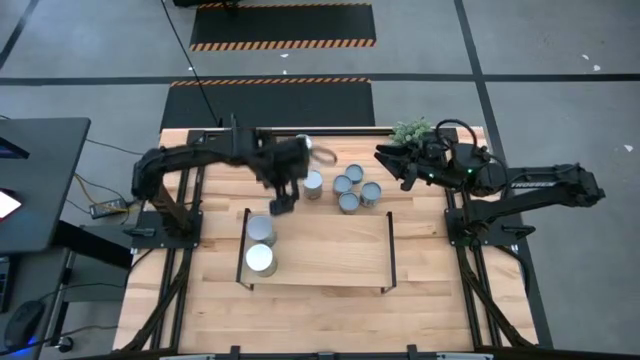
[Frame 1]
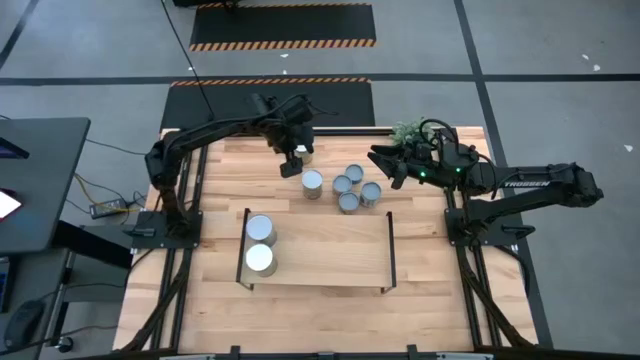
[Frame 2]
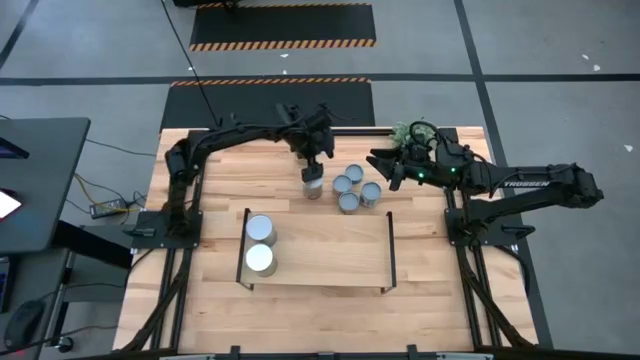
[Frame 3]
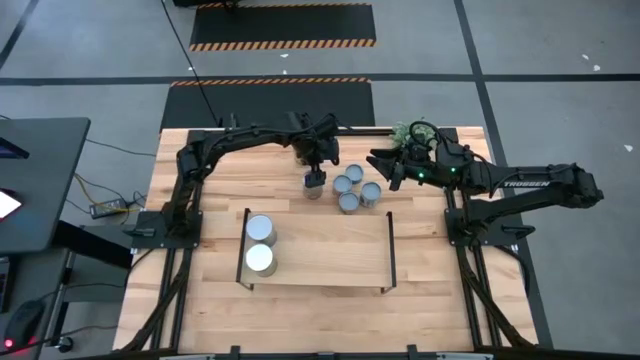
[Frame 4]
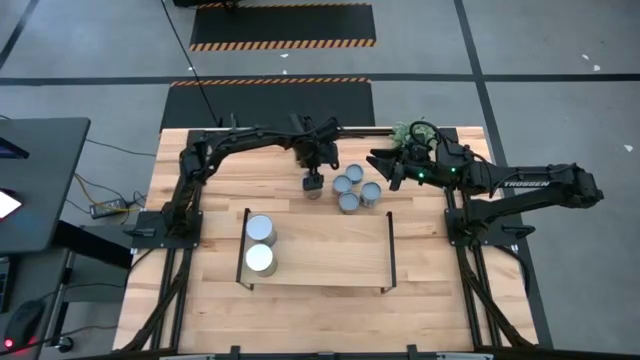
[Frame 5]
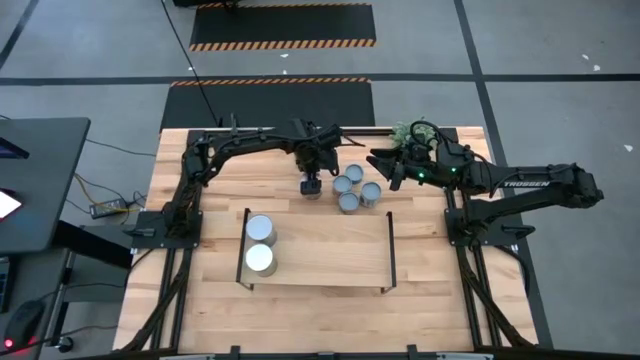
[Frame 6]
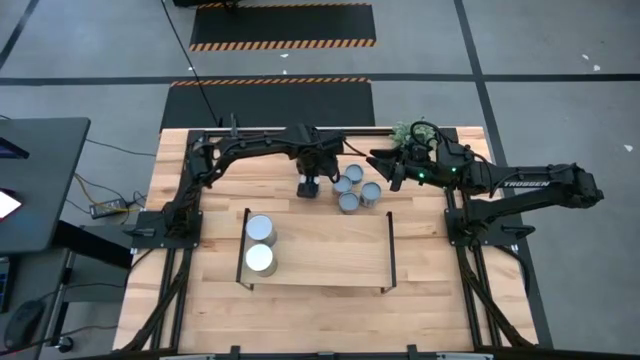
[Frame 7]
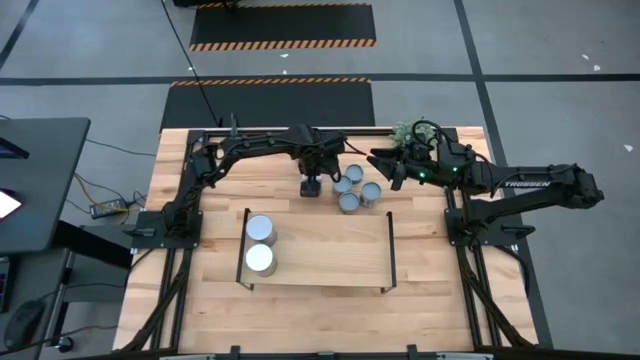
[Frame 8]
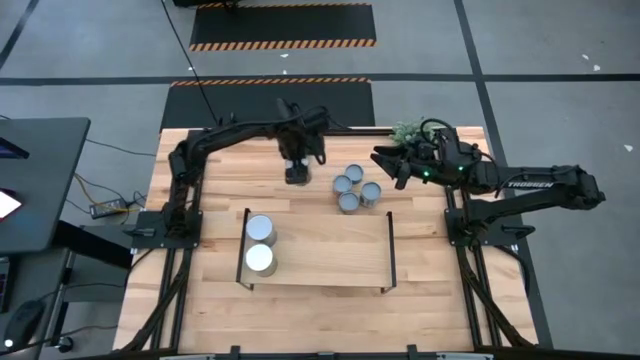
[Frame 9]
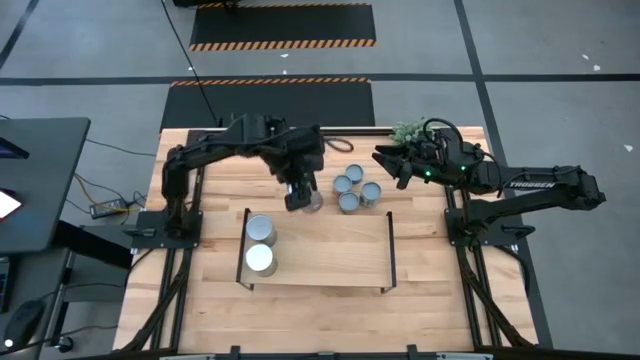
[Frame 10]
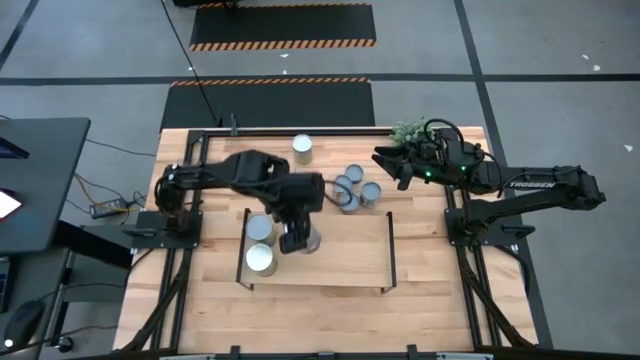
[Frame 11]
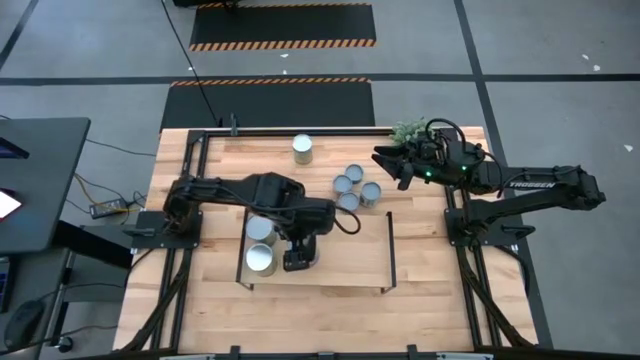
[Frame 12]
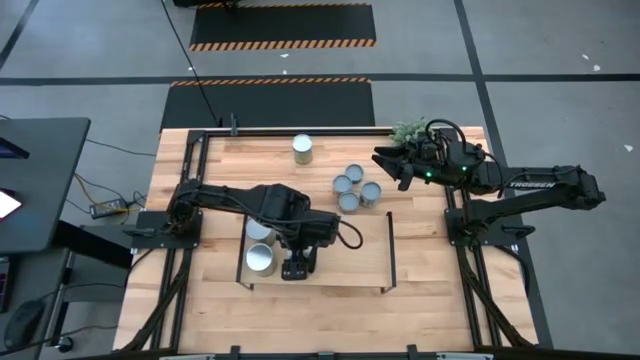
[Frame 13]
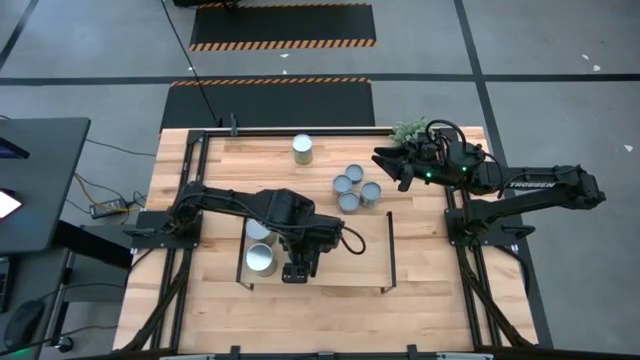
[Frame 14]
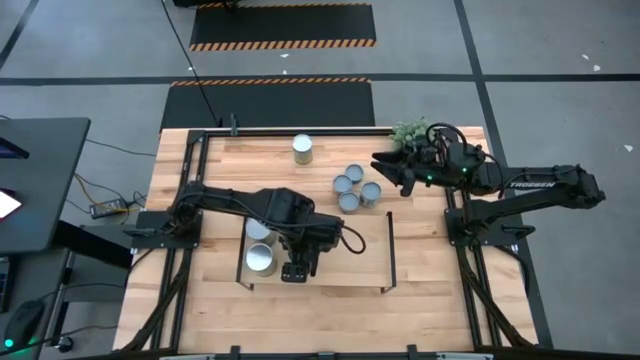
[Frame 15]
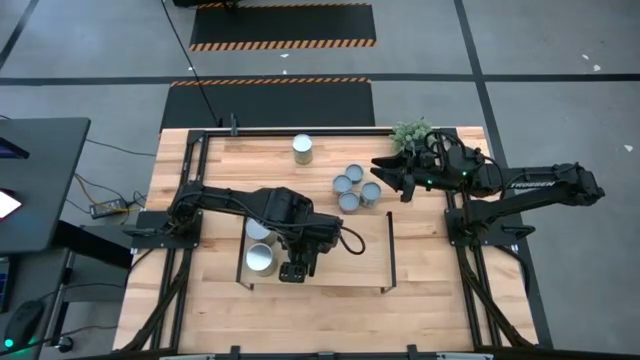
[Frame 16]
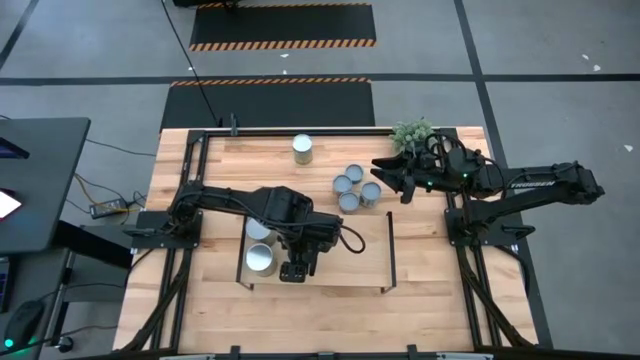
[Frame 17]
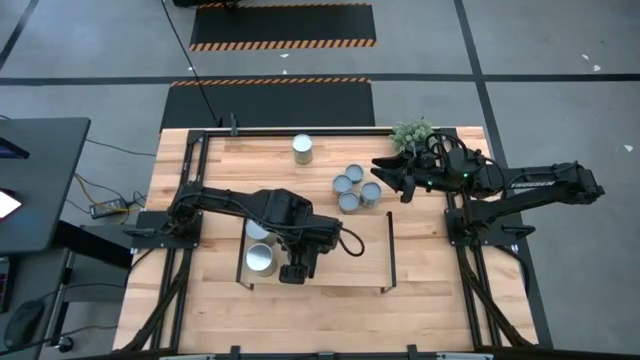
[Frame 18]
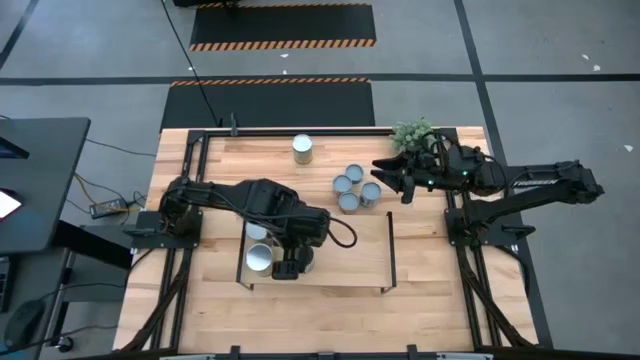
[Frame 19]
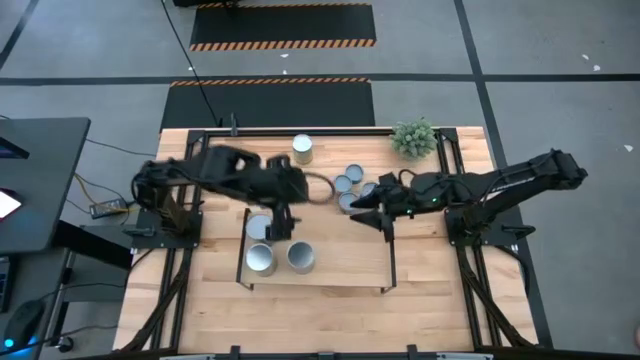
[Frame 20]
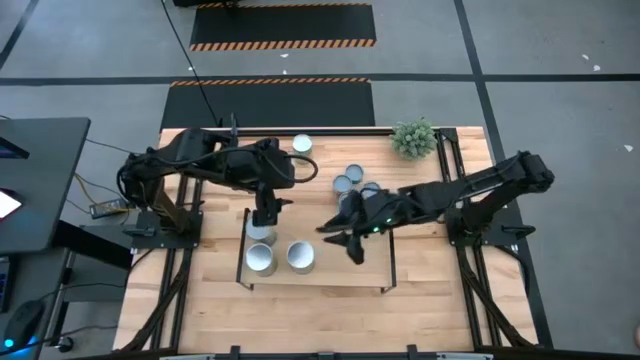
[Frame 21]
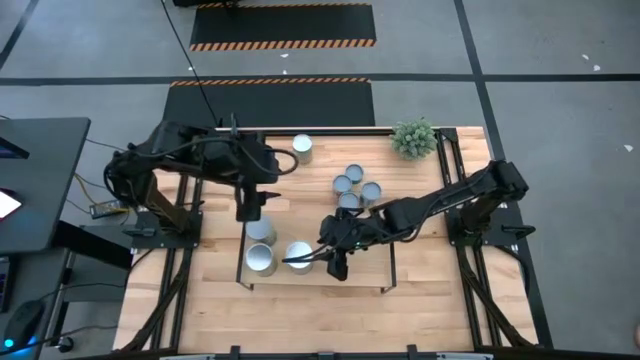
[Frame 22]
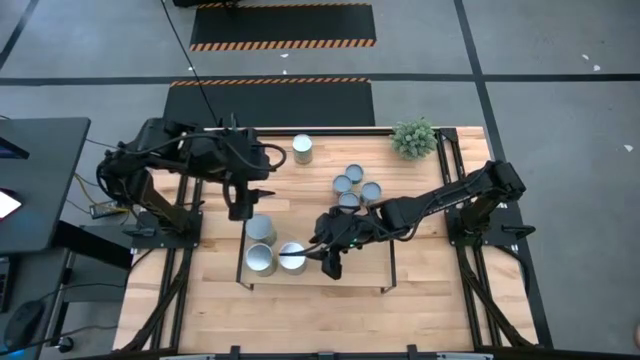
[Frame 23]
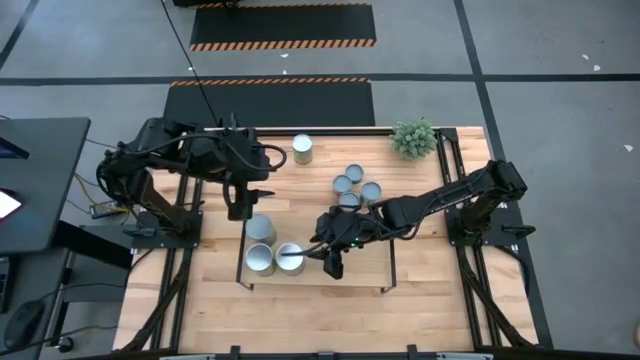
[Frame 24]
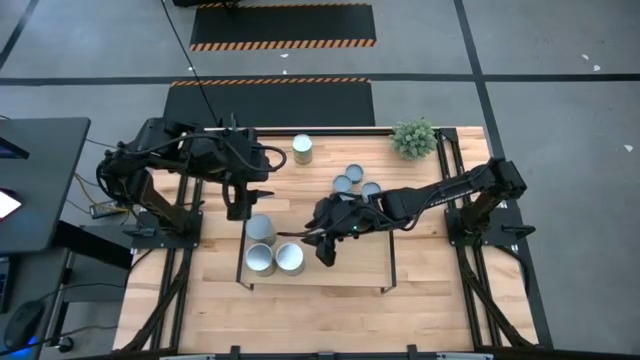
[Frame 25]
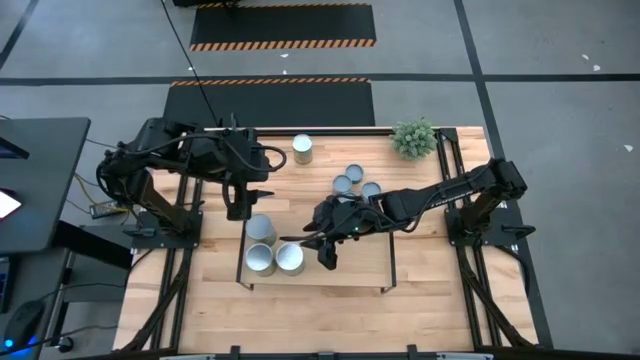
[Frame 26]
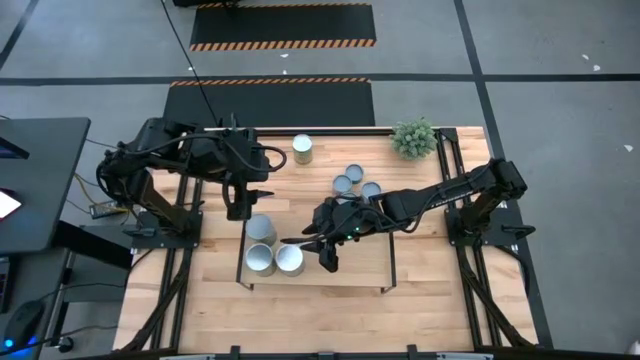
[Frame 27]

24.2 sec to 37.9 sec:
Task: Pick and place cans onto a shelf
Put the canned peaches on the shelf

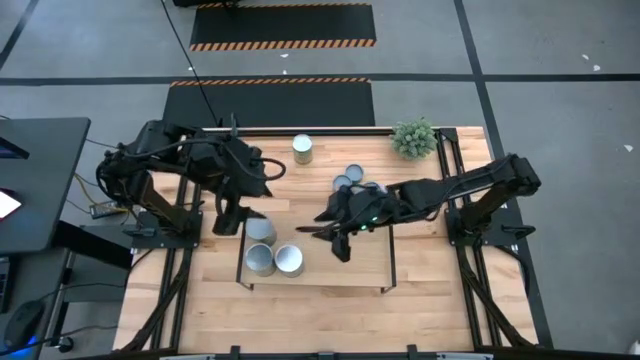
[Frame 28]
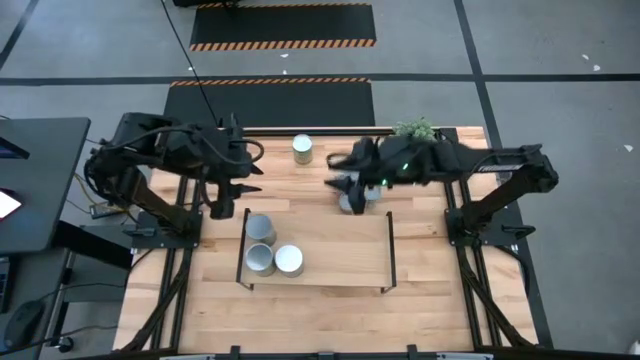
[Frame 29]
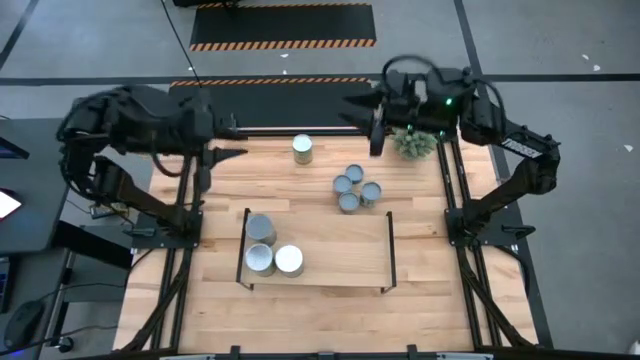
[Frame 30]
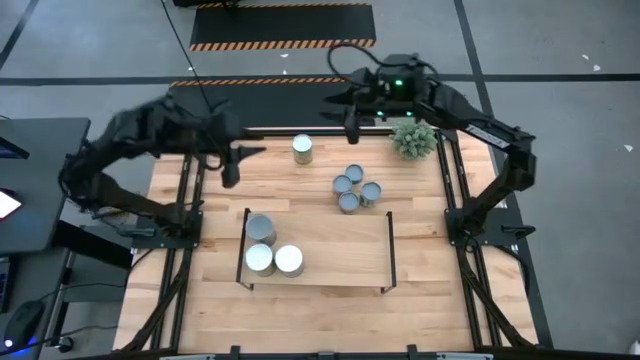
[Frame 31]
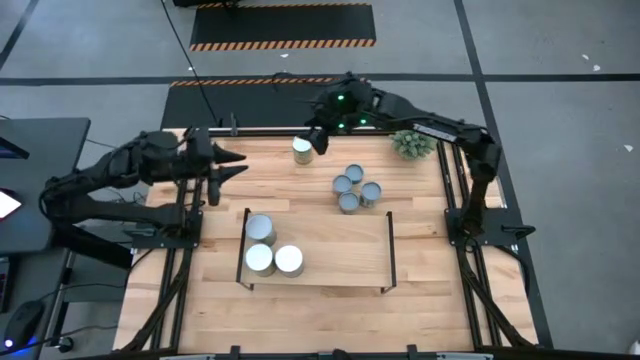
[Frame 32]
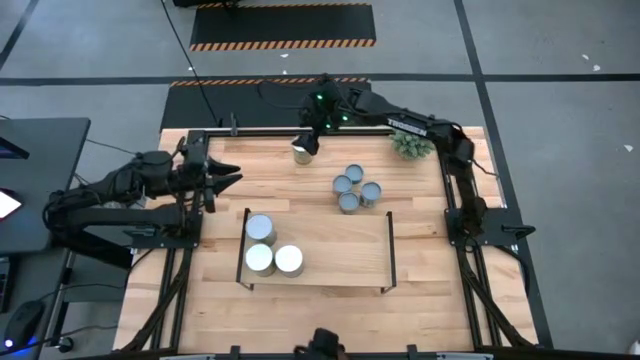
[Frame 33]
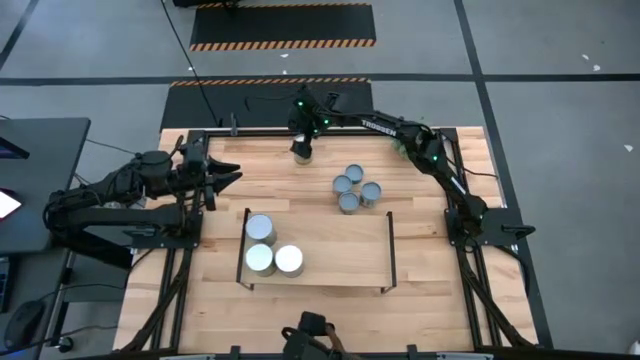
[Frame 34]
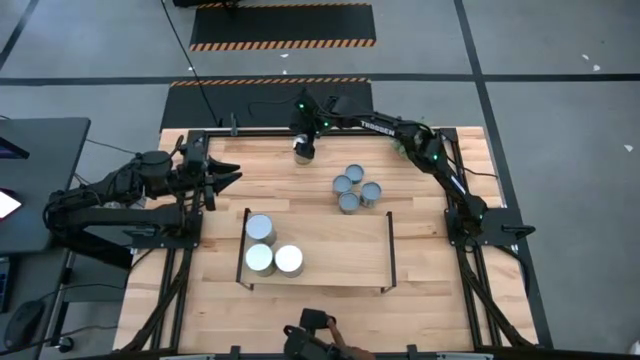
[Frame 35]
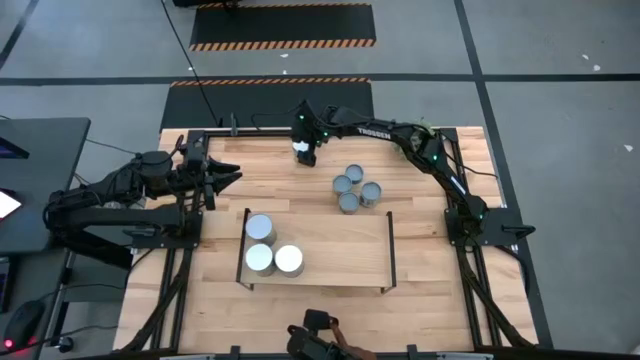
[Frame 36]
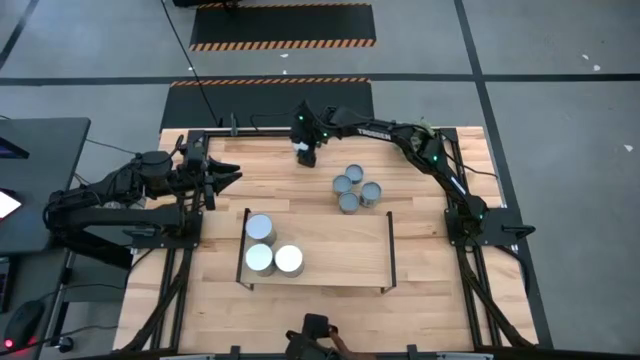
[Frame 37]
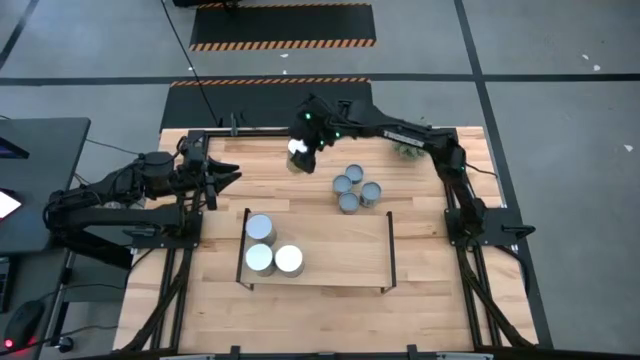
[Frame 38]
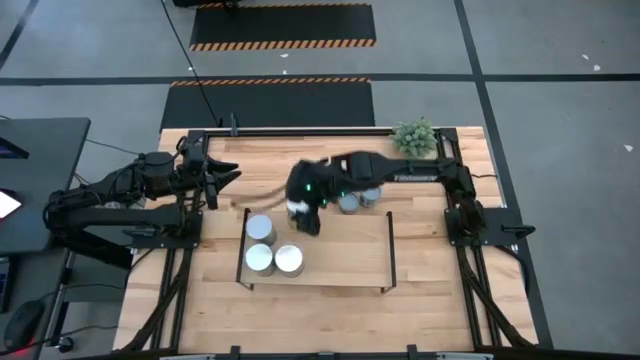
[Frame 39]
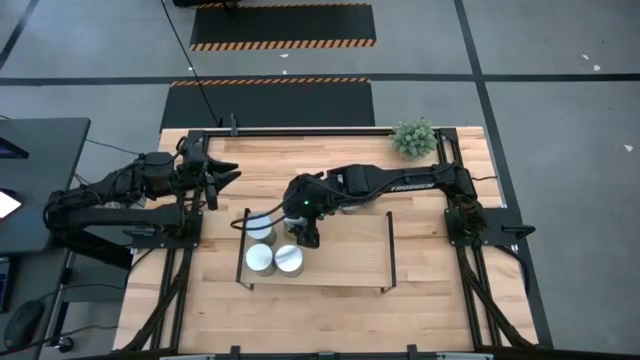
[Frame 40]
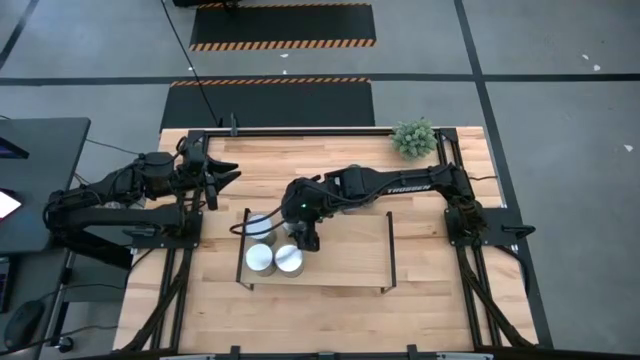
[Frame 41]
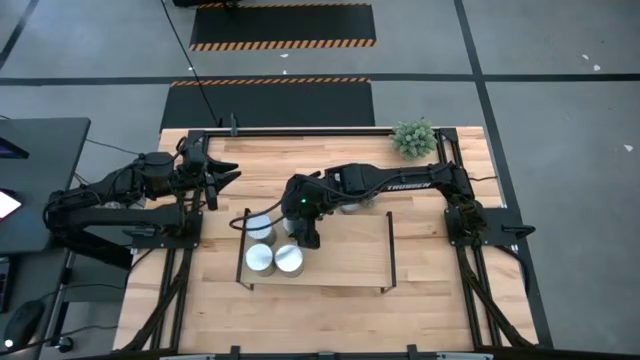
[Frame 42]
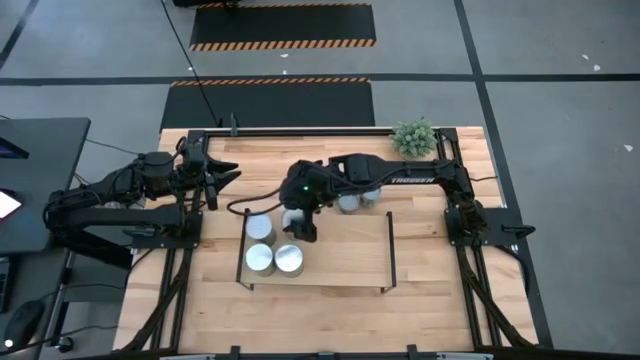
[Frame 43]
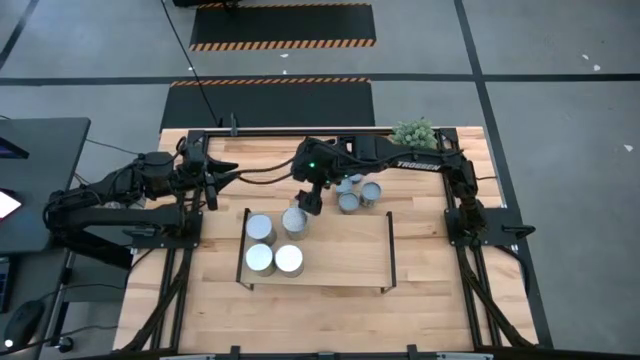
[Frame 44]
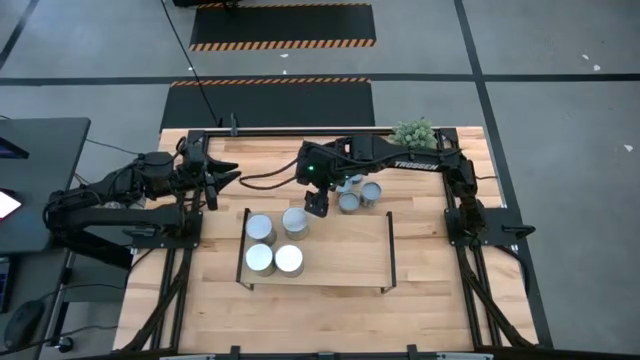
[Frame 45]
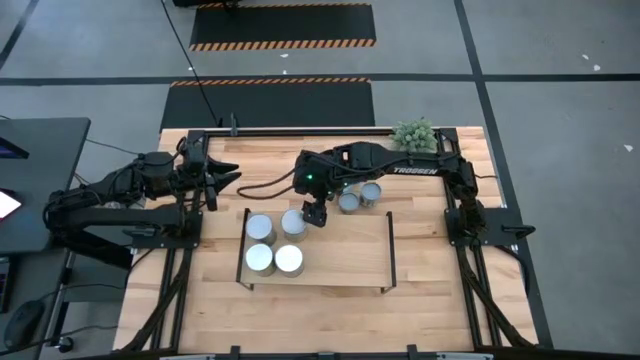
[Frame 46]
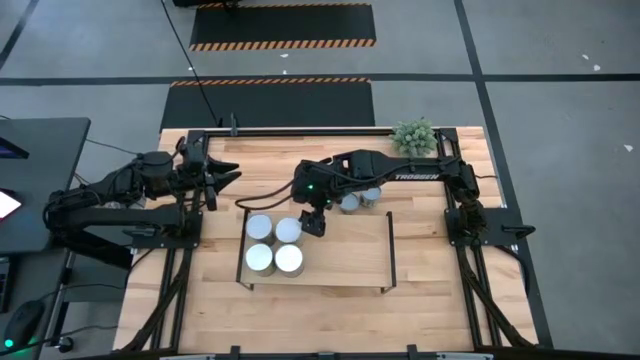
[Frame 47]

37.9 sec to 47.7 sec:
Put the canned carrots on the shelf
